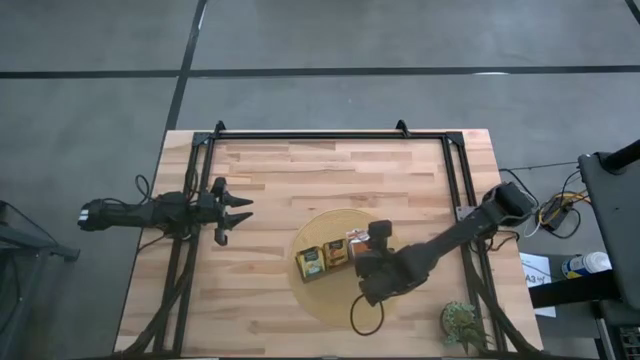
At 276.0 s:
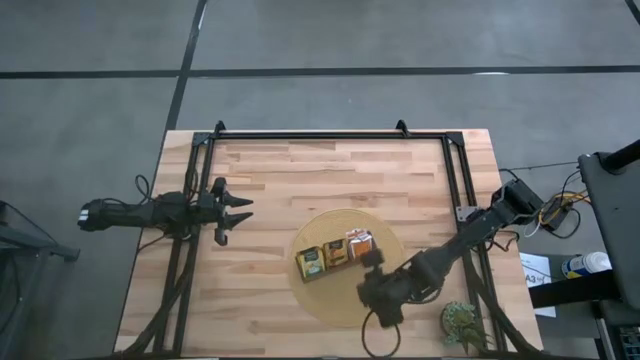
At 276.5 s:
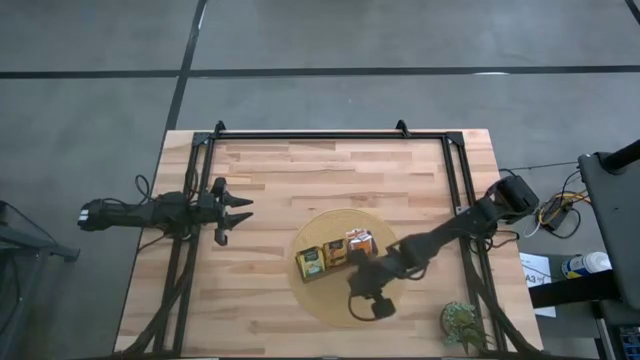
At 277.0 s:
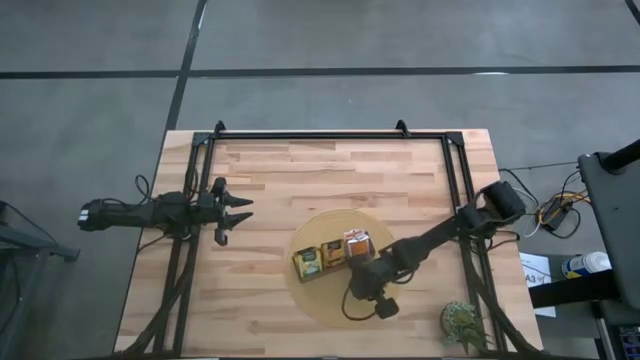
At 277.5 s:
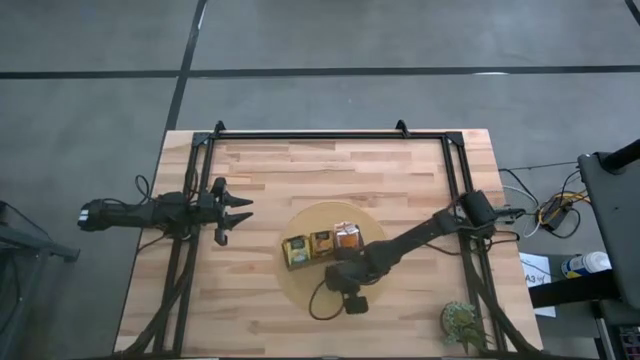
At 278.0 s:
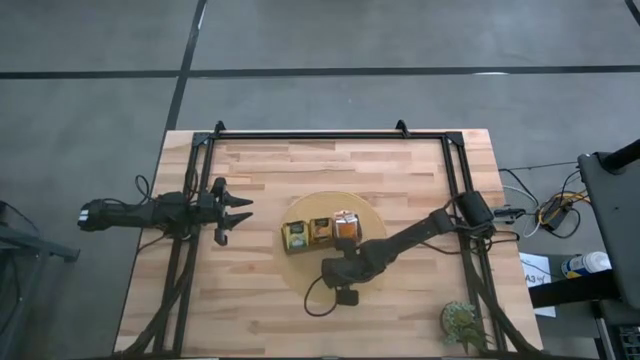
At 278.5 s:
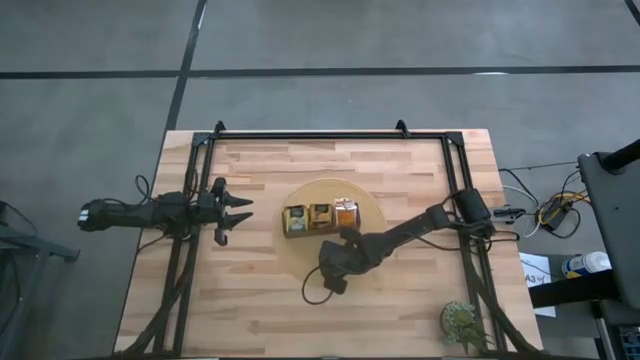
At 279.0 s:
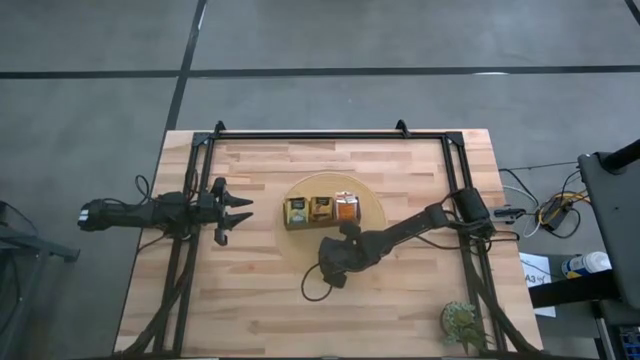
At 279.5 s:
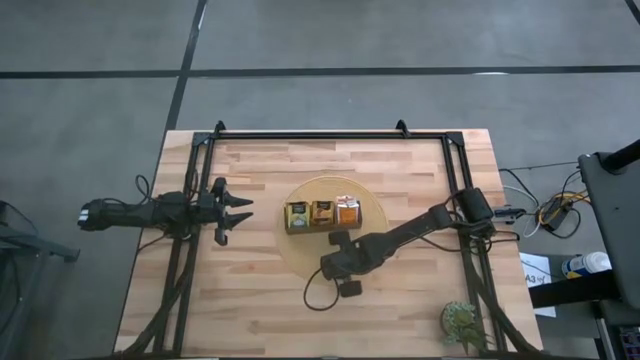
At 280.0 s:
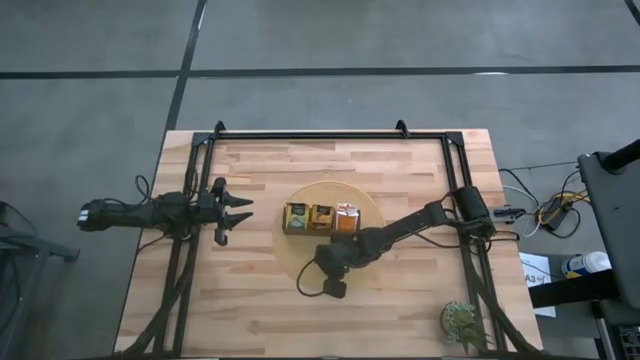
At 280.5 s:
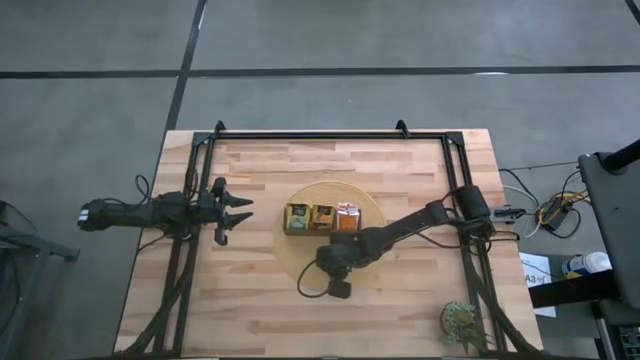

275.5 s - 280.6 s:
Task: Pick & Place Tea
Move the brown table mat to the center of the table

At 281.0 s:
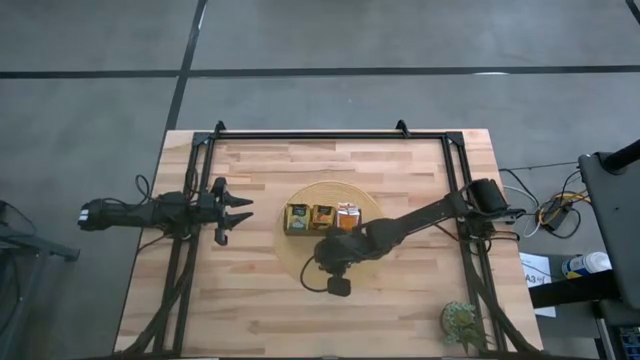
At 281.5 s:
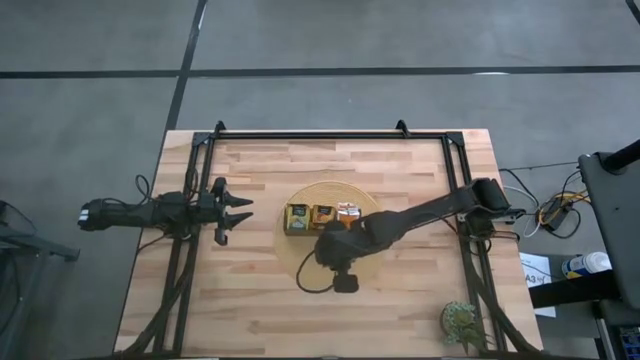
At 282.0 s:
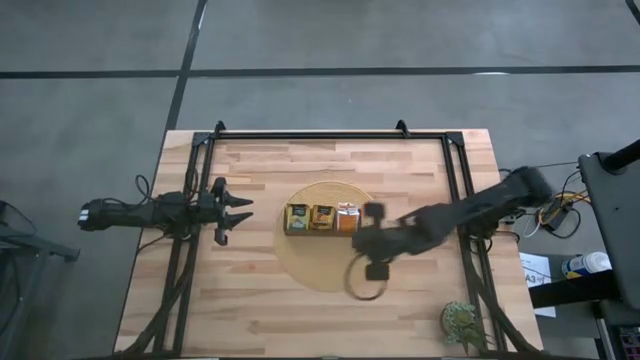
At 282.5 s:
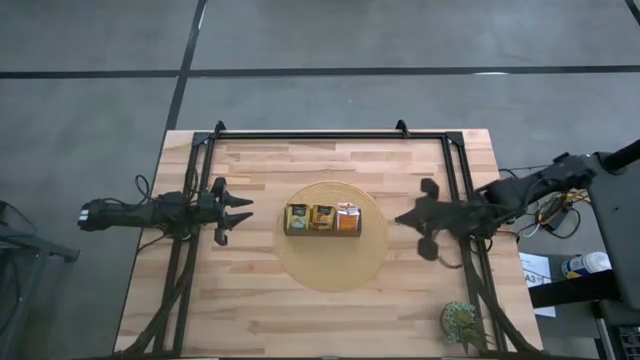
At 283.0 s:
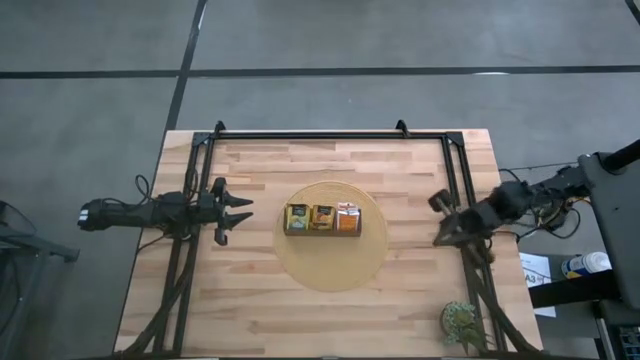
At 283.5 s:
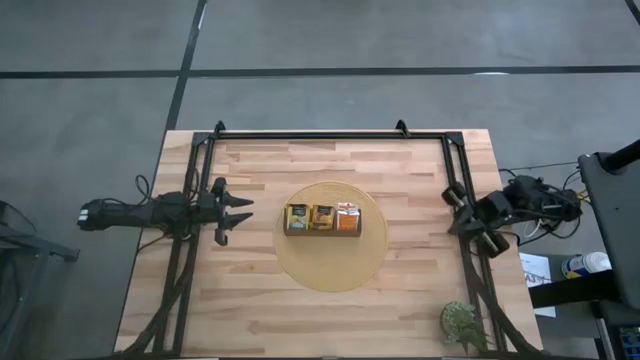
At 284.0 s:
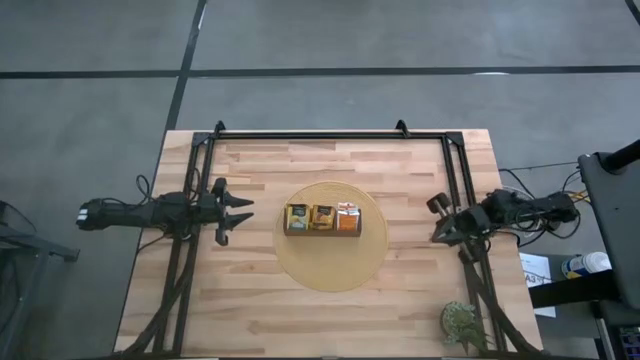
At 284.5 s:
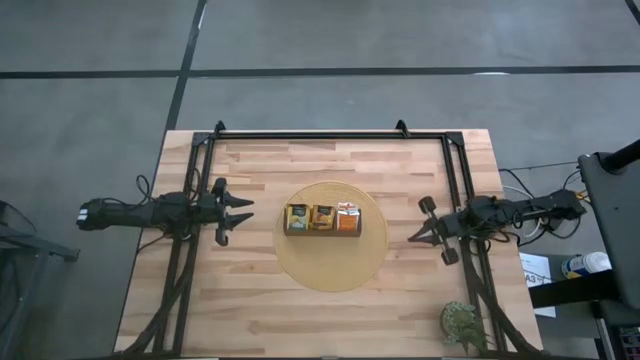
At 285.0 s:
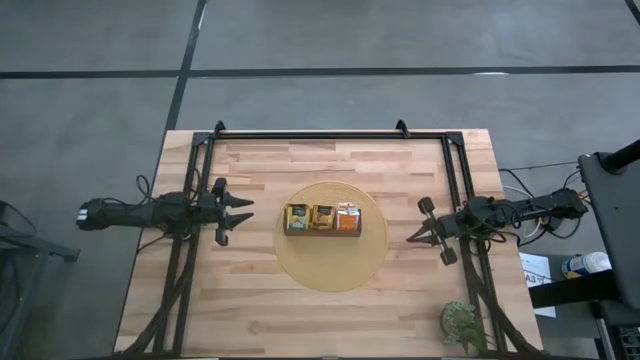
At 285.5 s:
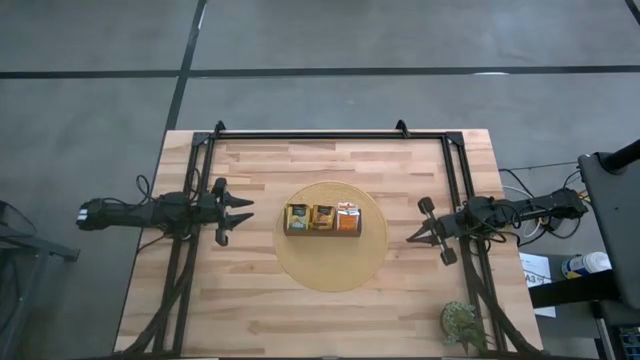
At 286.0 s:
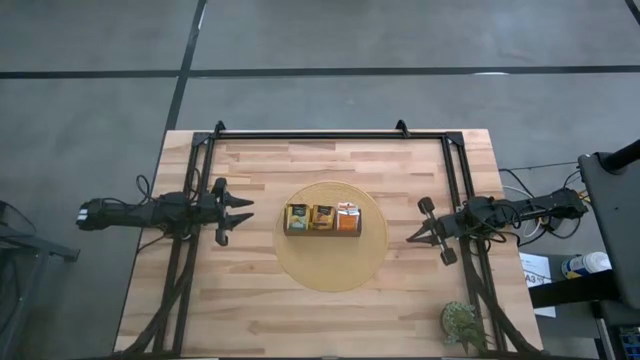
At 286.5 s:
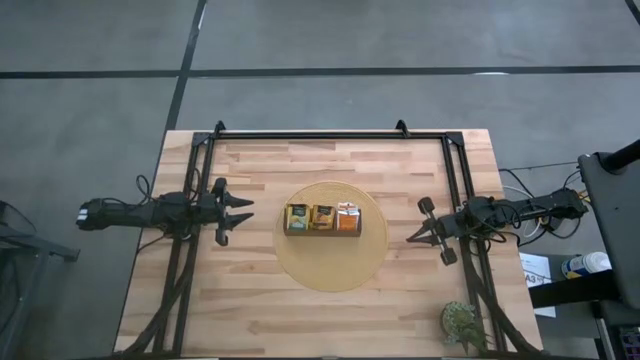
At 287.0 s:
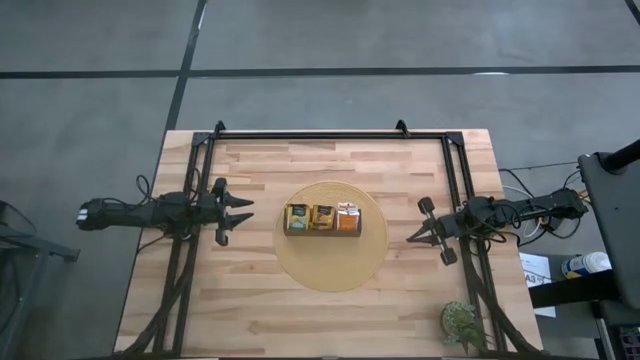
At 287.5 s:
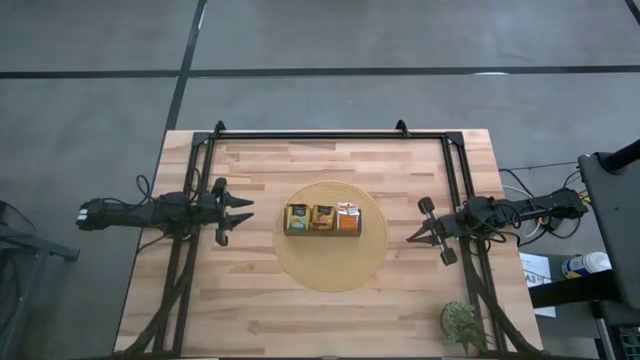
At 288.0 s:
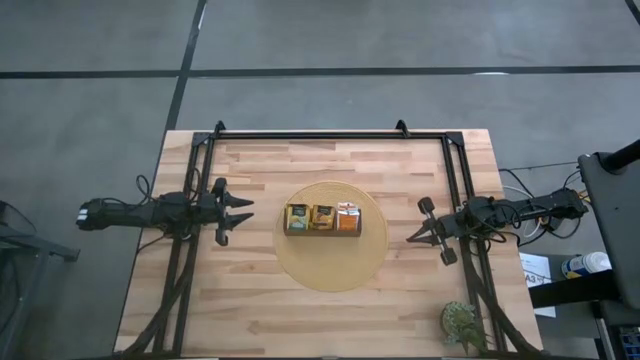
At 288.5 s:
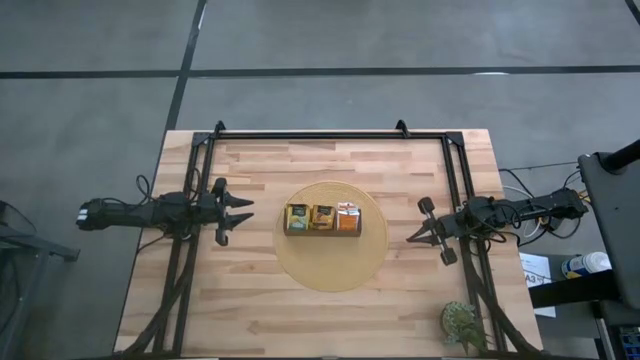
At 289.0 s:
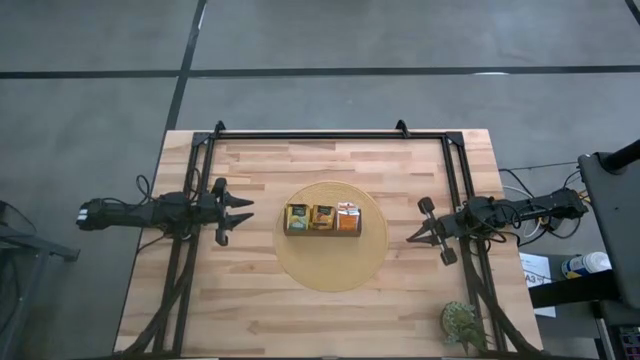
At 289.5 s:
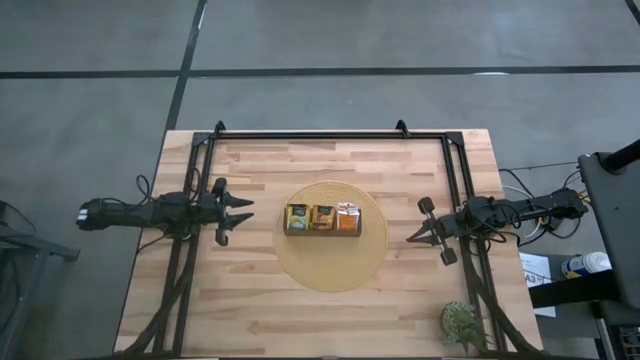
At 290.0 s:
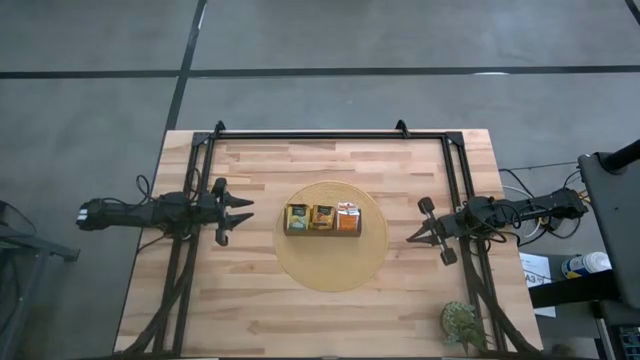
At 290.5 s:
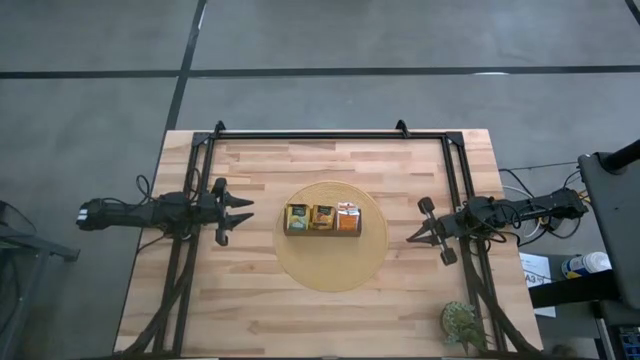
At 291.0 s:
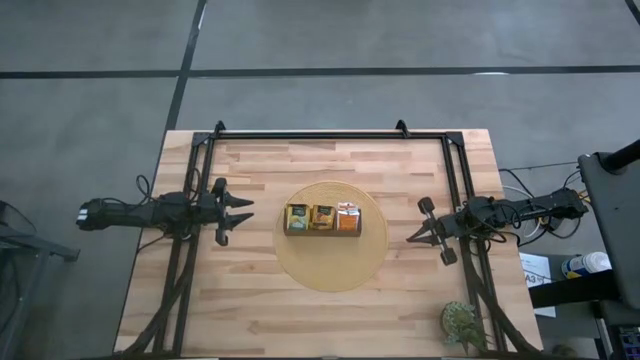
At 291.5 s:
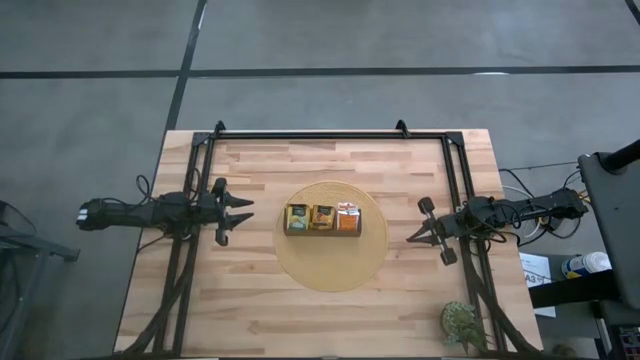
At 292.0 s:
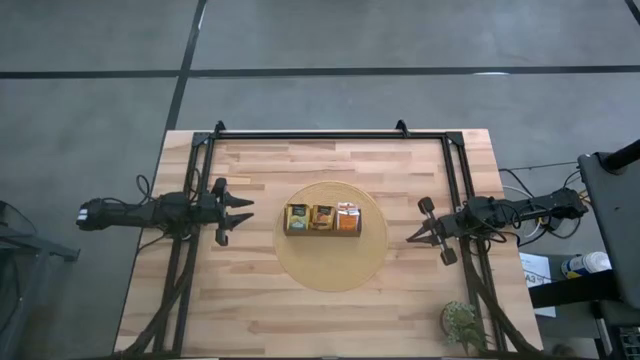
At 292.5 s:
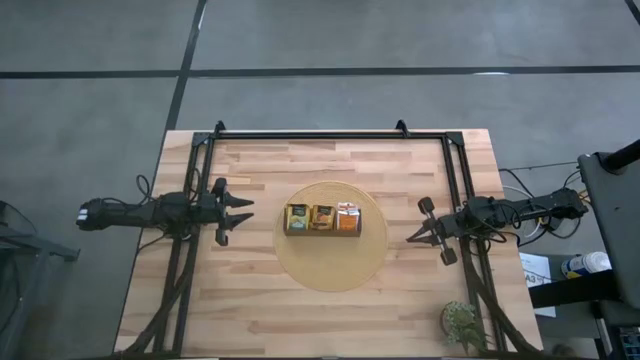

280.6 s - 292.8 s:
Return to Home Position

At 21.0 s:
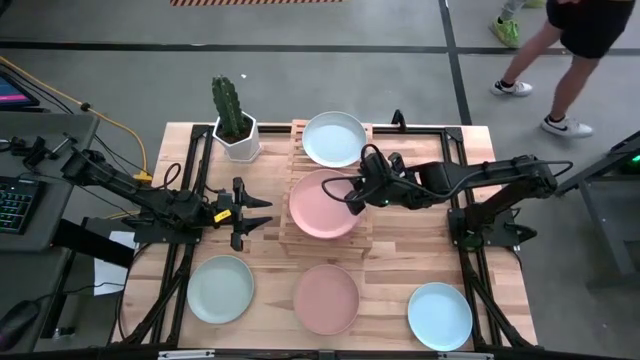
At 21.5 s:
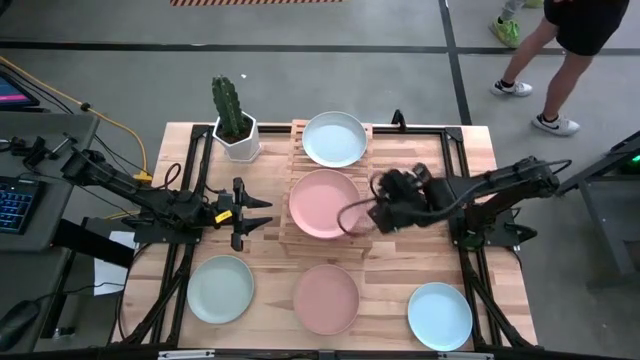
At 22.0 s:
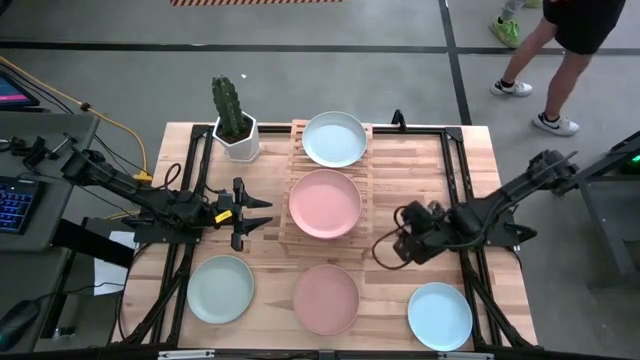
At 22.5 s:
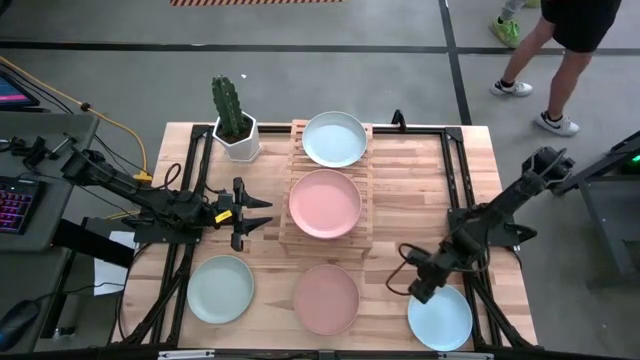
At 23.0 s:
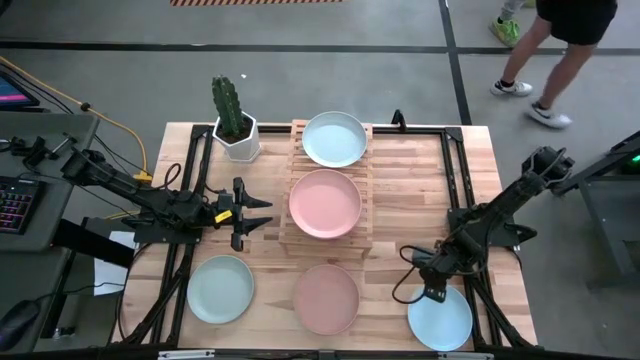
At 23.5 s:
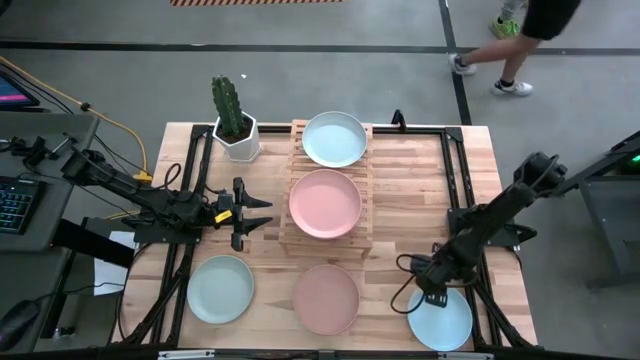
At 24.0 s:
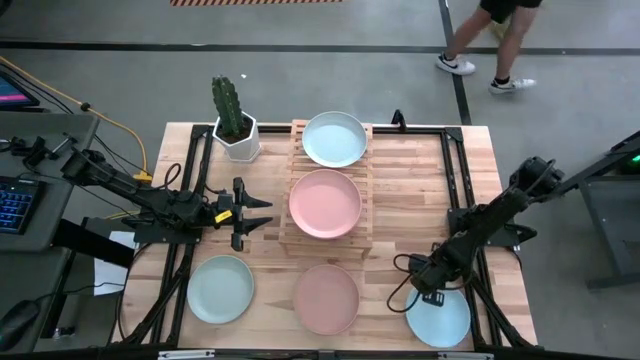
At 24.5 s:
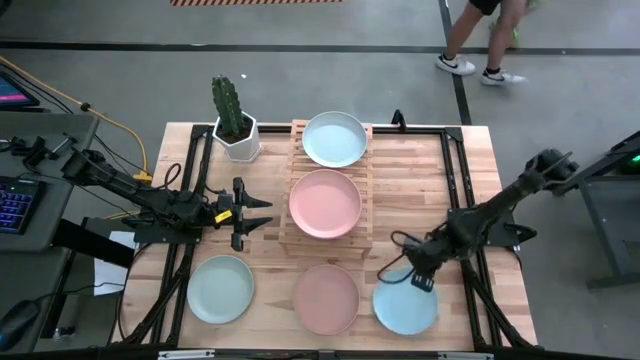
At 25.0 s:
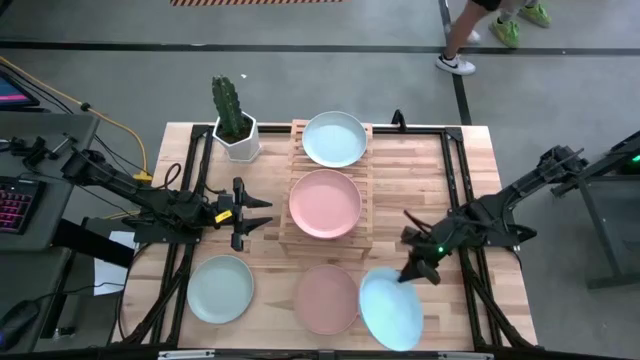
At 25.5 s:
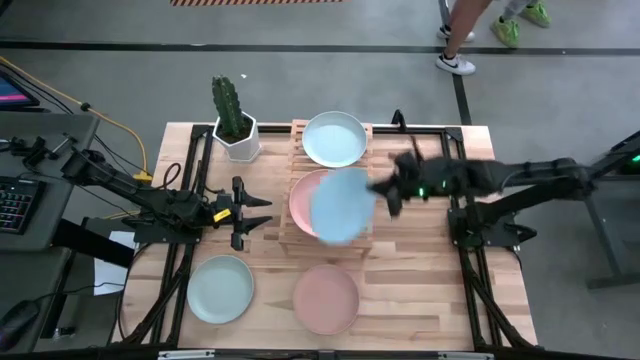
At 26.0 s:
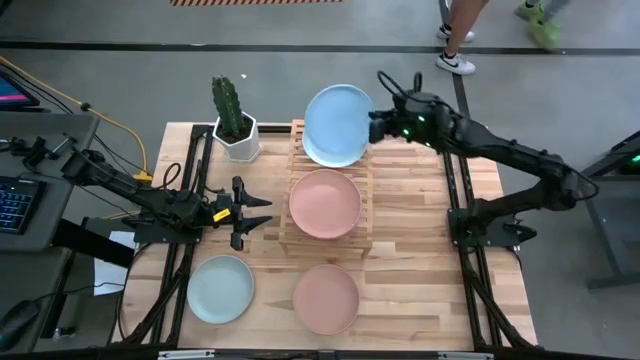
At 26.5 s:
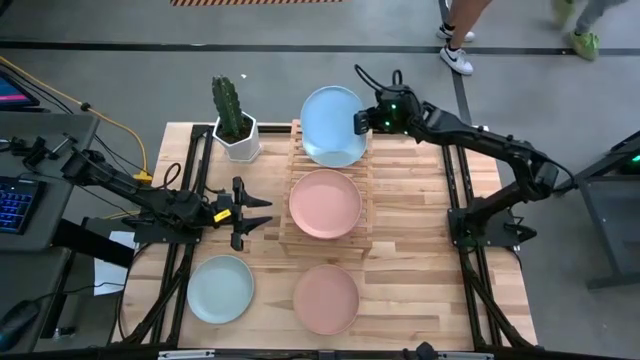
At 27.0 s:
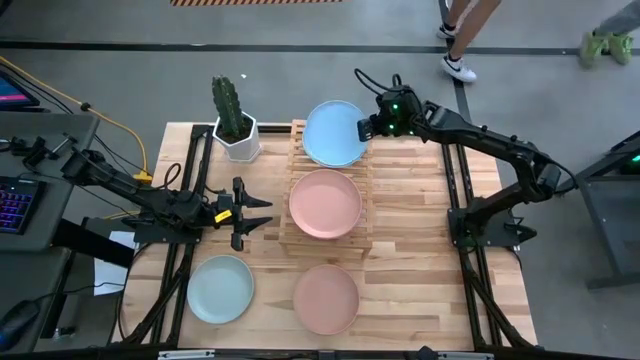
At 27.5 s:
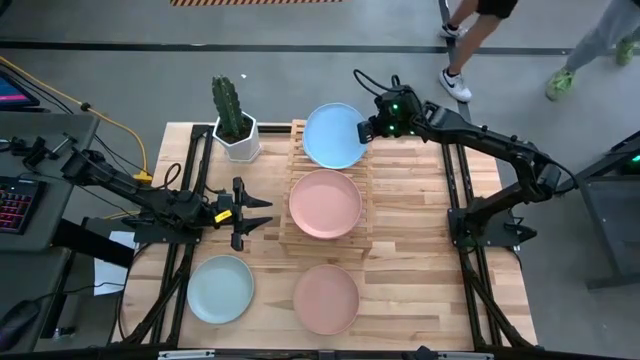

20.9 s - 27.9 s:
Task: Place and stack plates onto a shelf
Stack the white plate on the gray plate on the shelf
